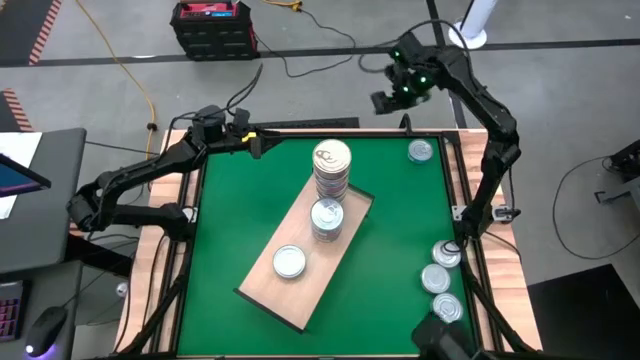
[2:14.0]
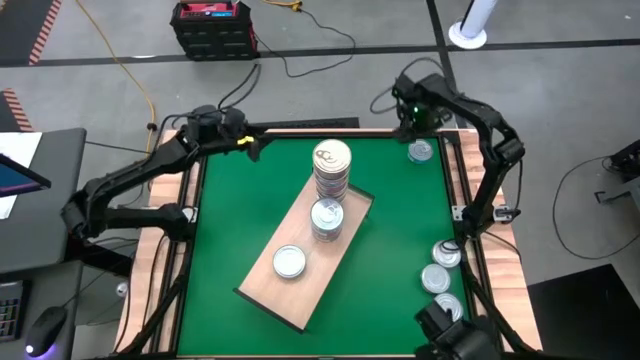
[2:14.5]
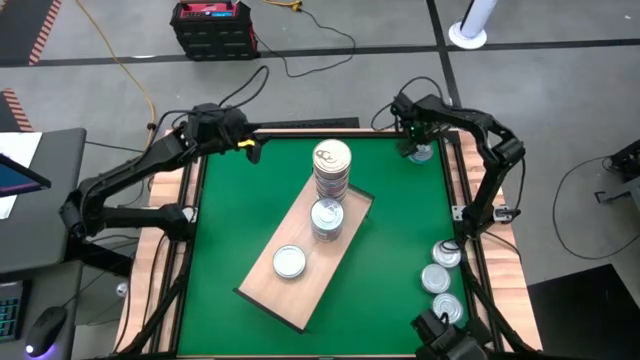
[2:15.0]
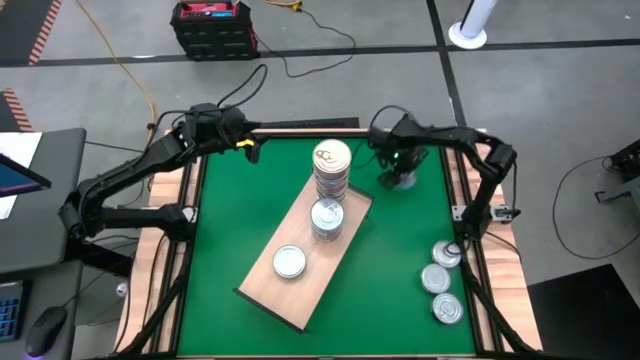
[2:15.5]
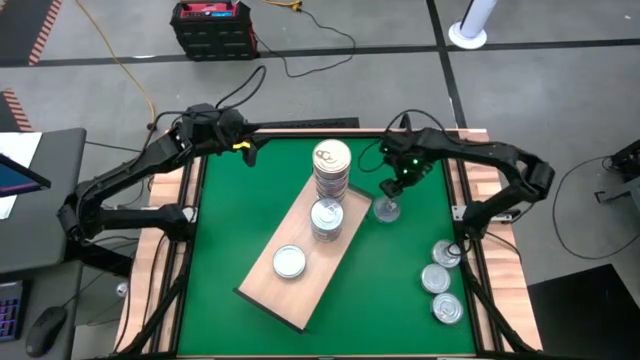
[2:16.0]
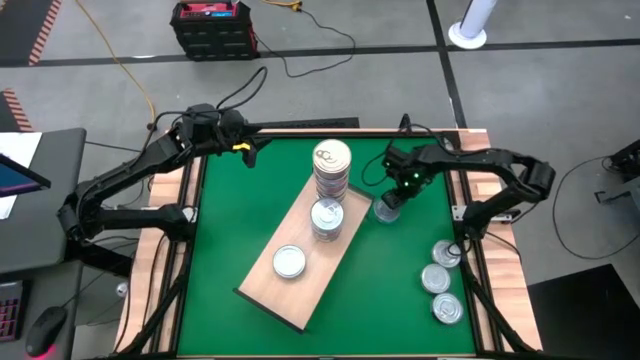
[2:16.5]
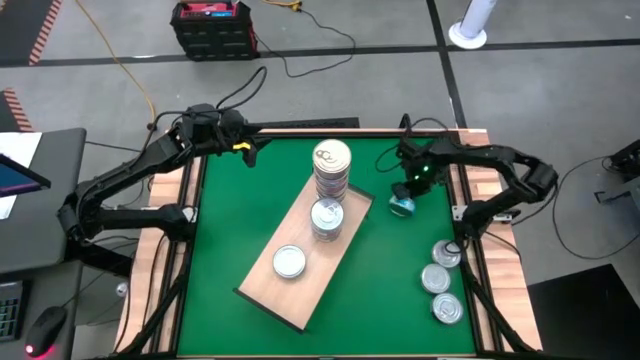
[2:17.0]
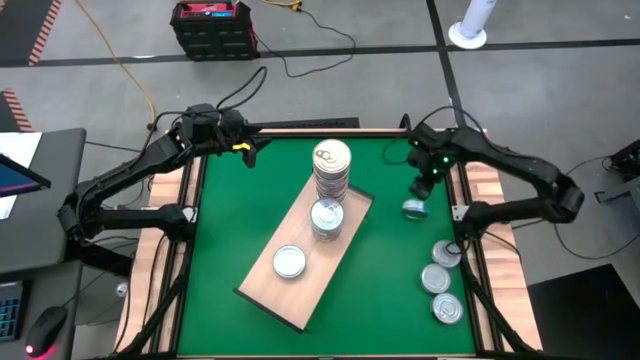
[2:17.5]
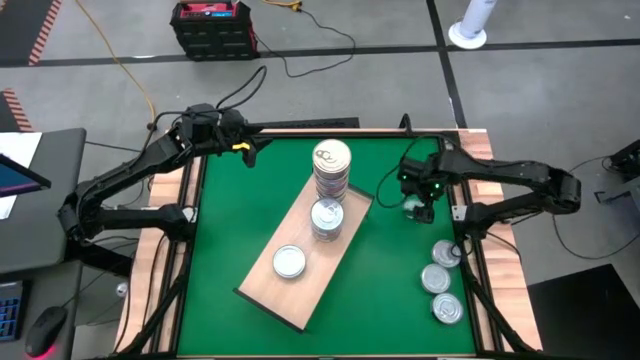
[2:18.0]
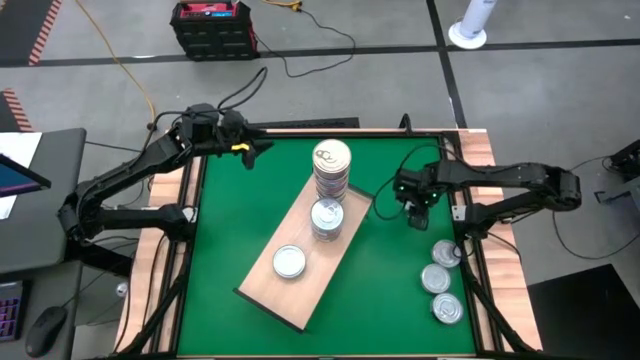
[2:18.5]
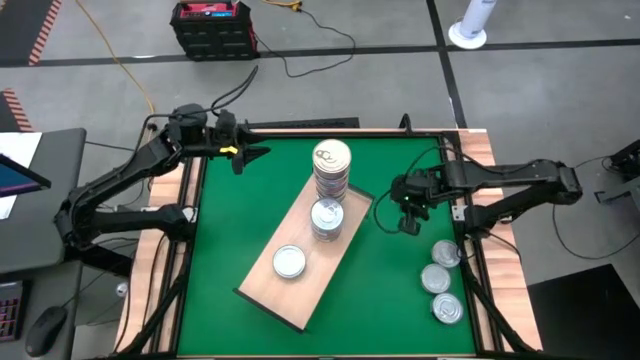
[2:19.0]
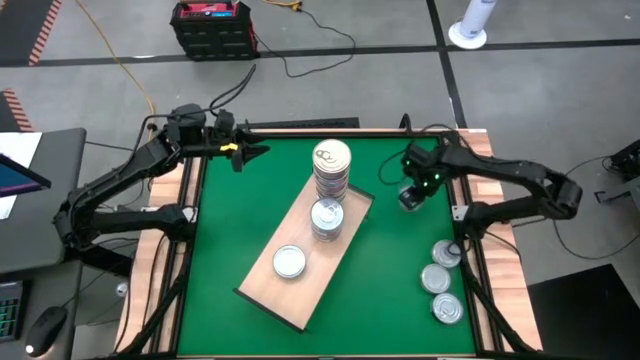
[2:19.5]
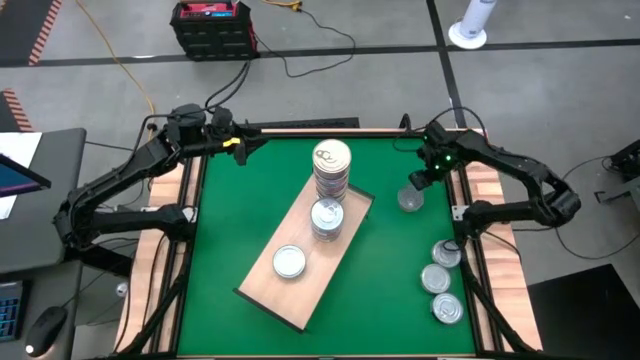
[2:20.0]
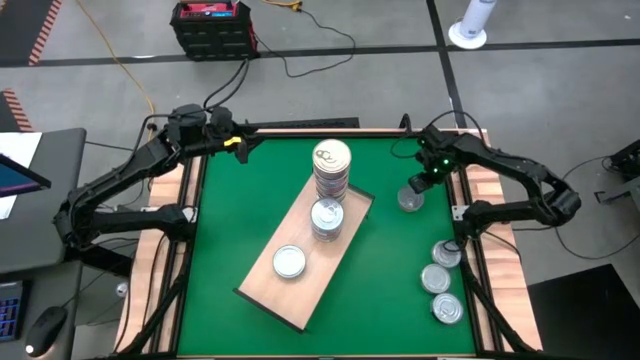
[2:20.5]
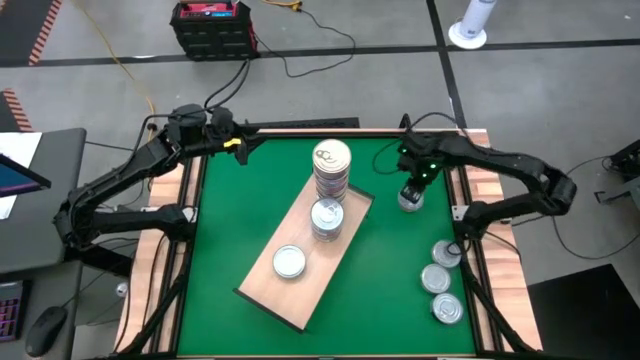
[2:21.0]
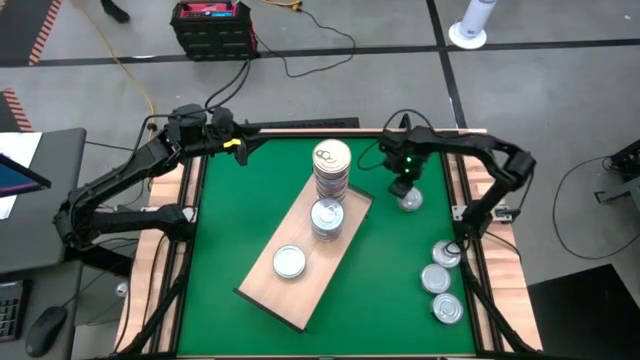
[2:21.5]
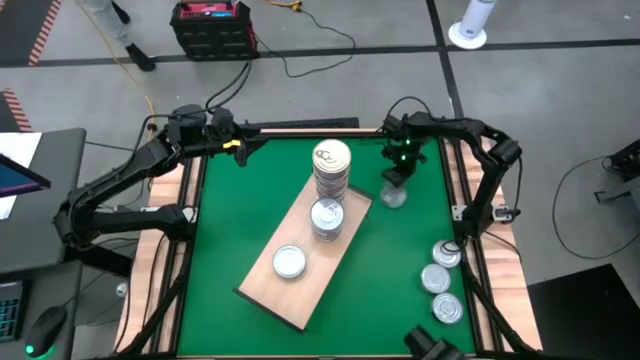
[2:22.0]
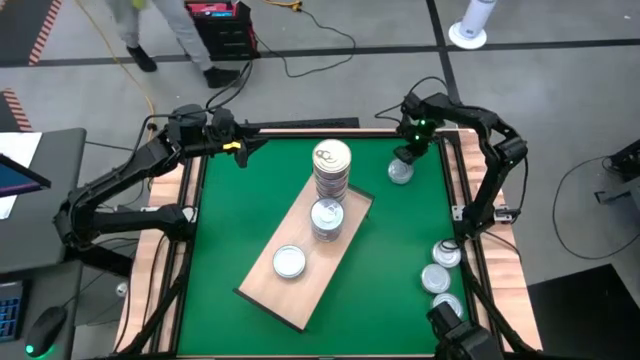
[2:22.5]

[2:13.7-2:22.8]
Task: Stack canned seafood by type on shelf
Stack the yellow blue tuna can on top of the blue tuna can on the shelf

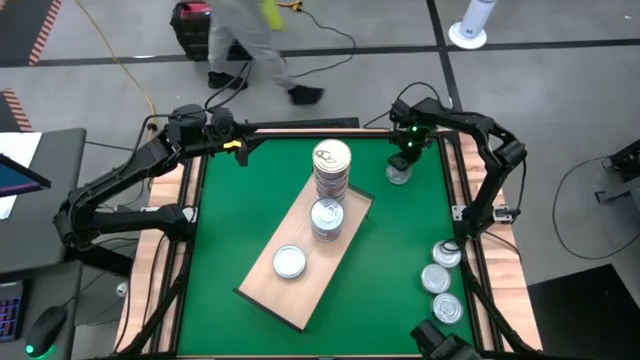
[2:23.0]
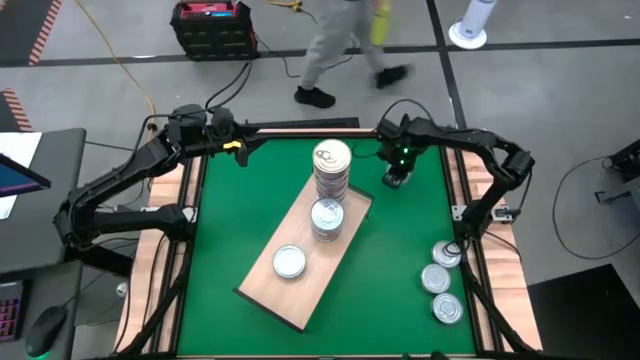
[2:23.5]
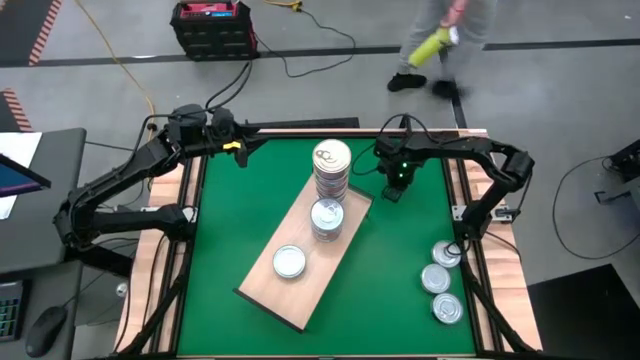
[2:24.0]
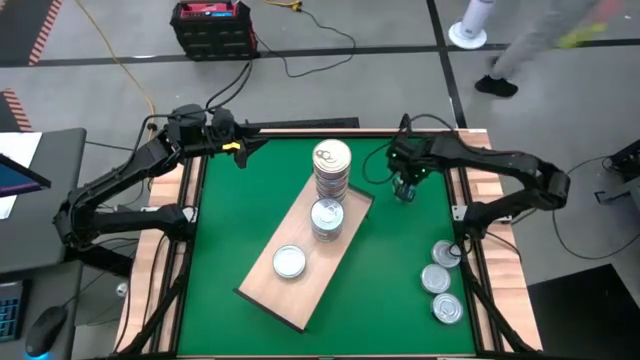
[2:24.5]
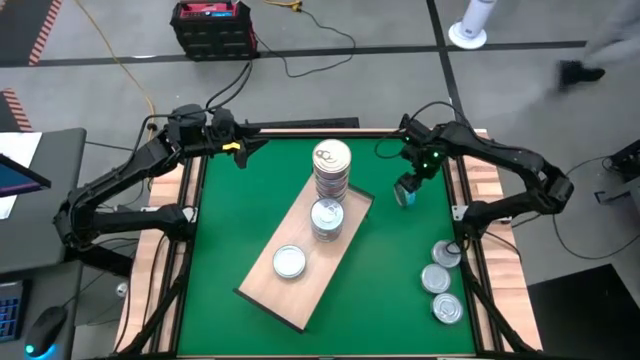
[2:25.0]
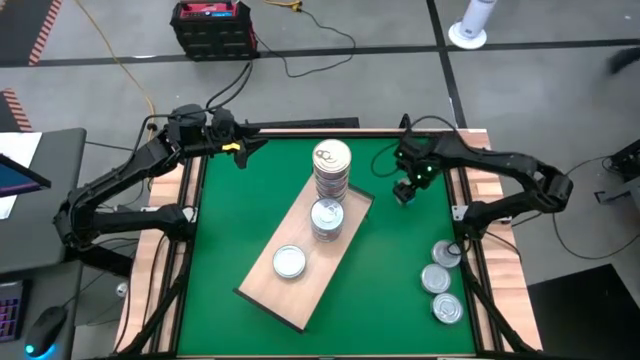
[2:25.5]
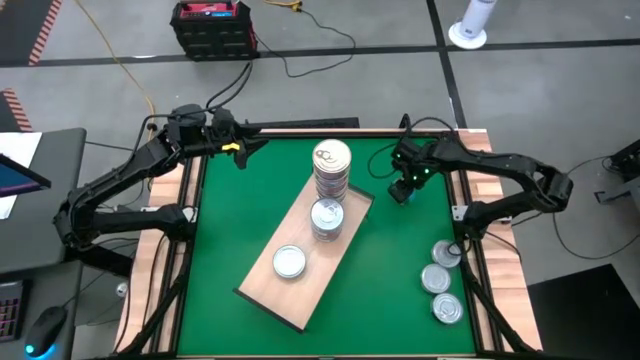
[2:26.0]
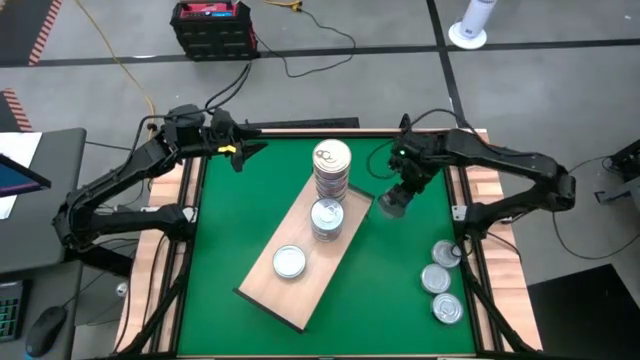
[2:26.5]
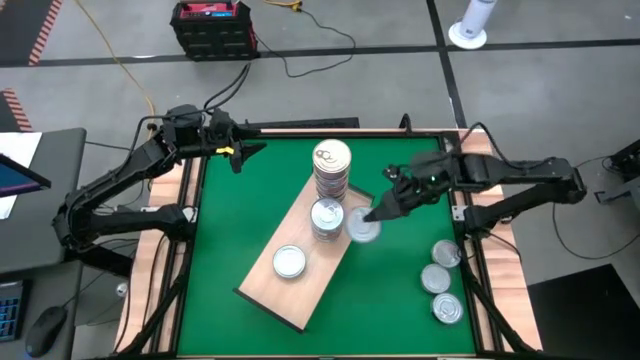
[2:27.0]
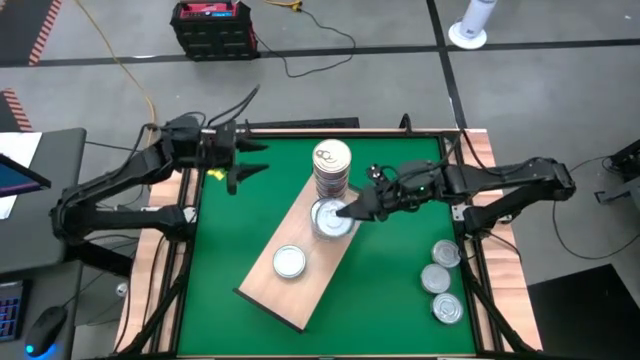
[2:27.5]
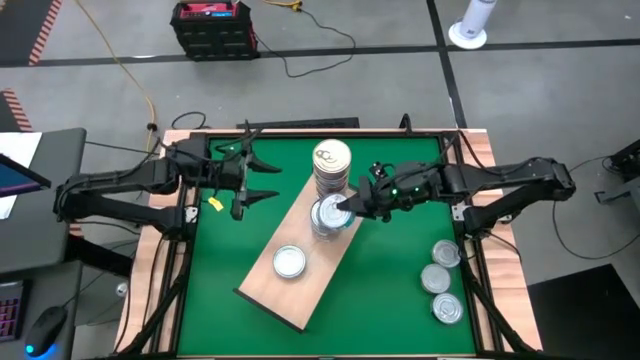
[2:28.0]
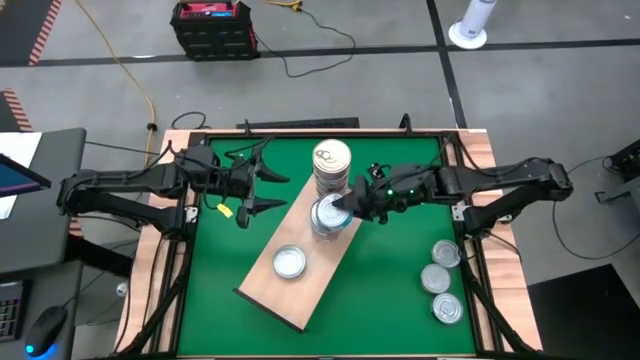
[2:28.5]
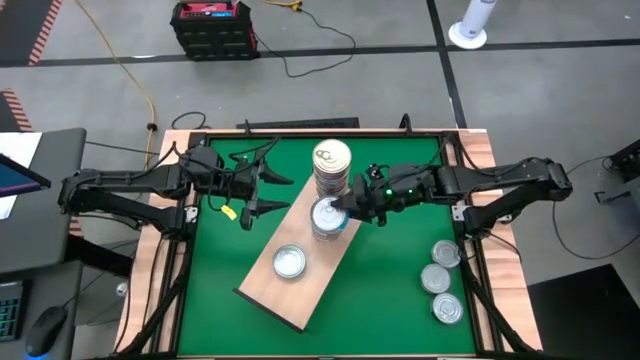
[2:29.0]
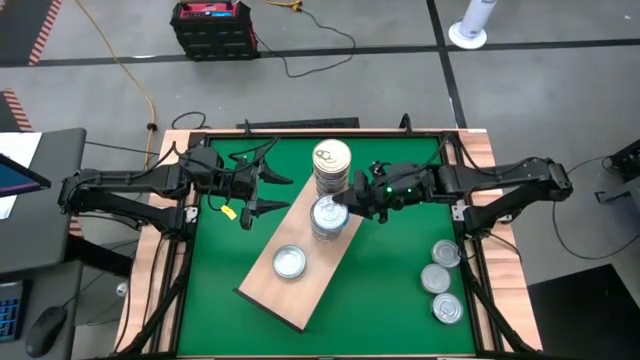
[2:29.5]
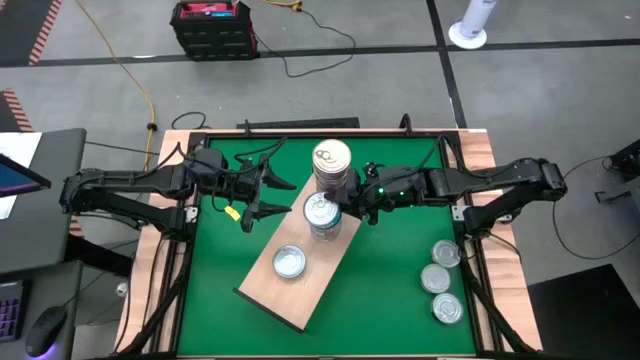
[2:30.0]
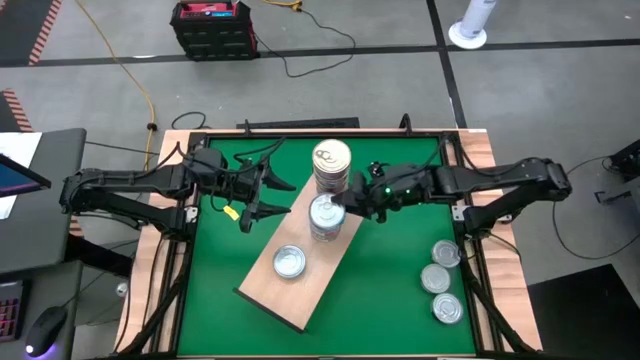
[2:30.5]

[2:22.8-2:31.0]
Stack the yellow blue tuna can on the blue tuna can on the shelf

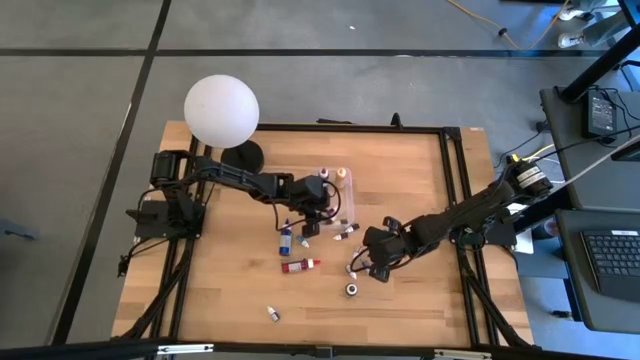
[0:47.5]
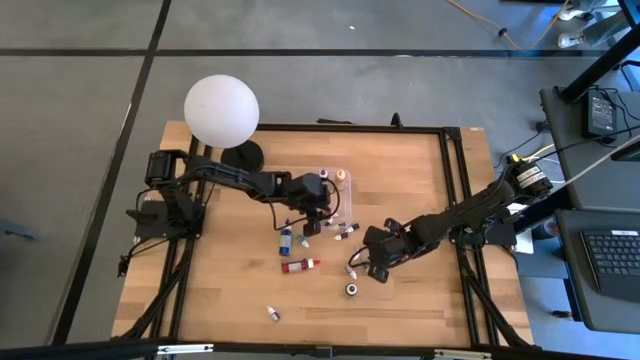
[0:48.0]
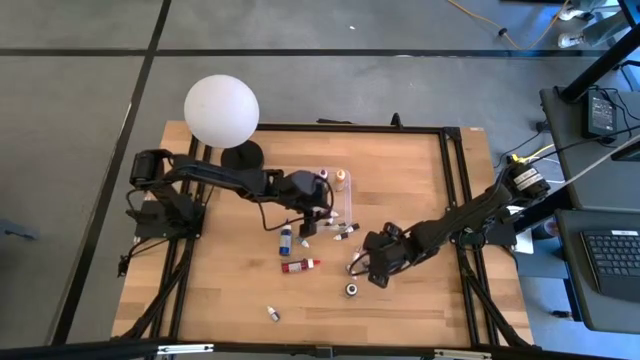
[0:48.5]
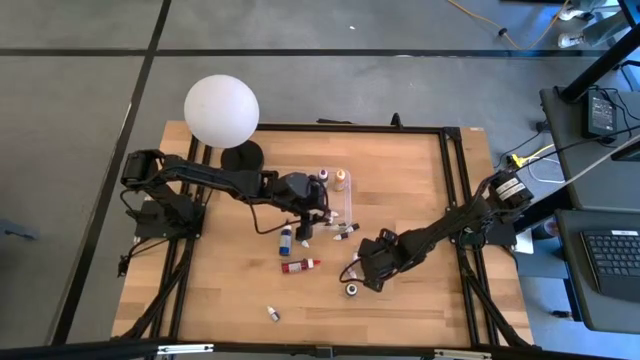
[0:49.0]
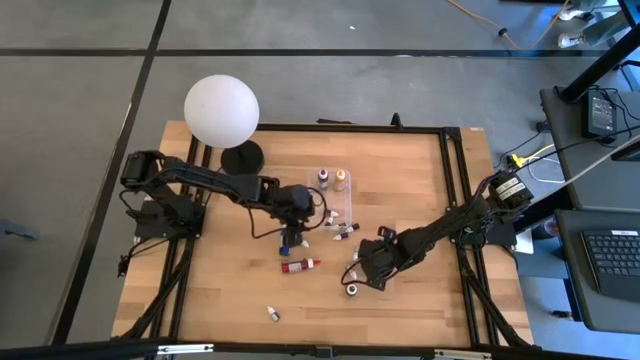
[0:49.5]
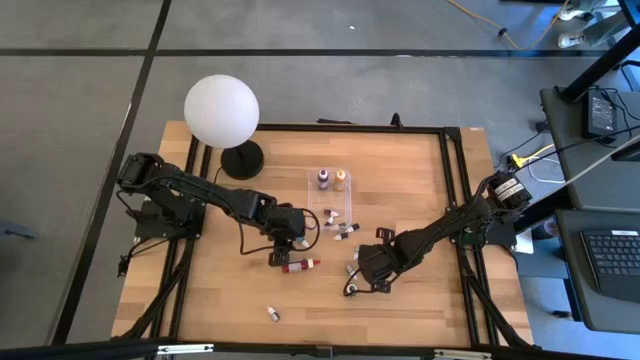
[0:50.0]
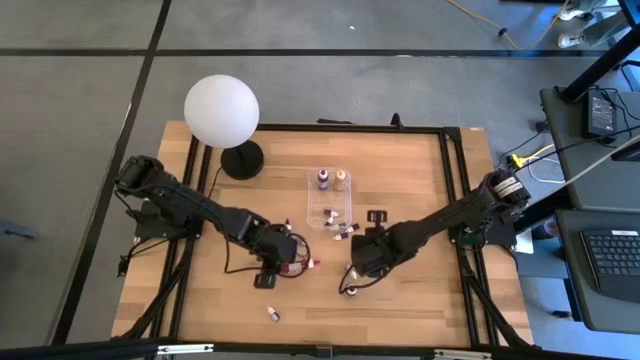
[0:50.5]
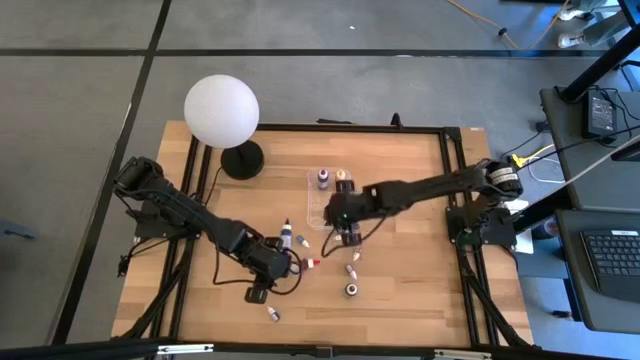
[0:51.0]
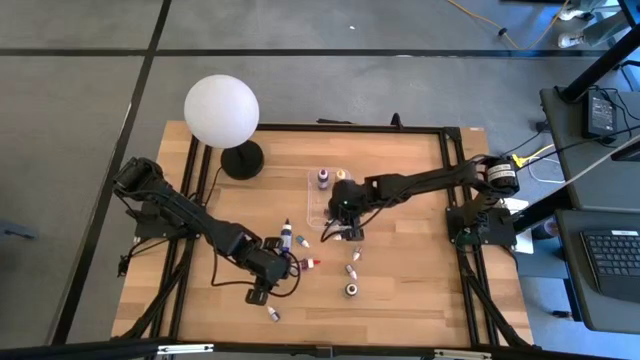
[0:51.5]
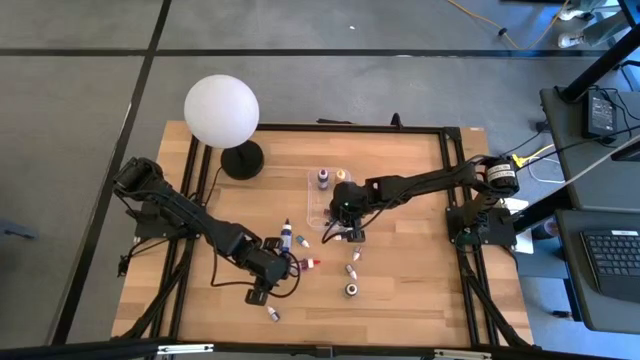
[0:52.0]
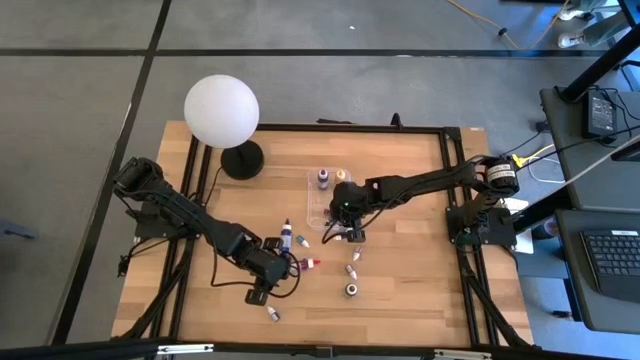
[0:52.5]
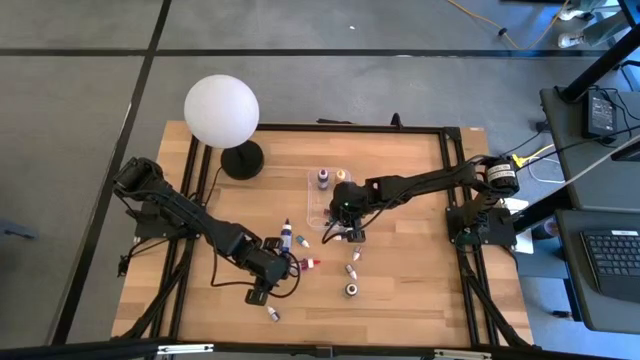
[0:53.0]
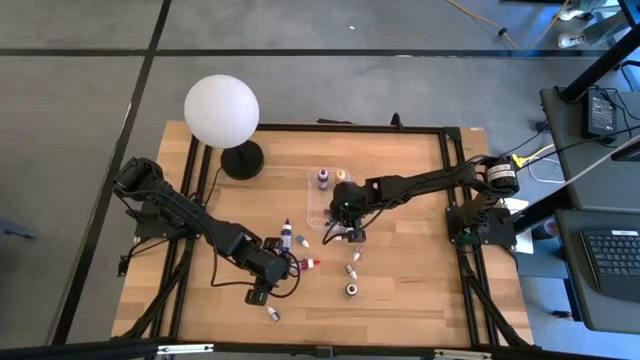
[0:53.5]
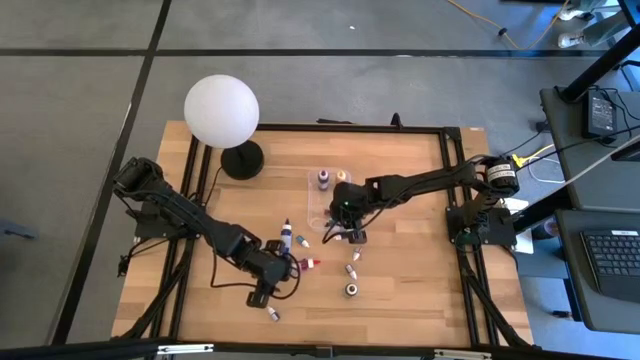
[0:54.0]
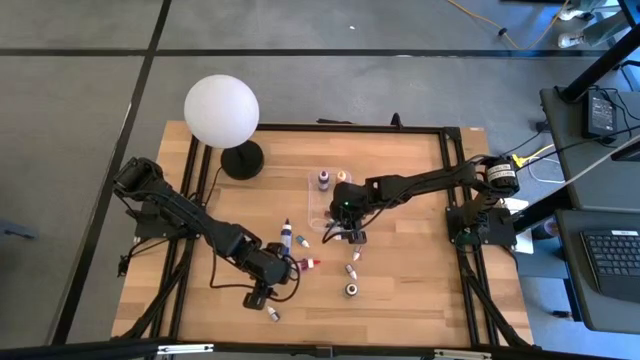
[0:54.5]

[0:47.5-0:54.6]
Task: Pick & Place food coloring
Put the small blue food coloring bottle in the transparent bin
